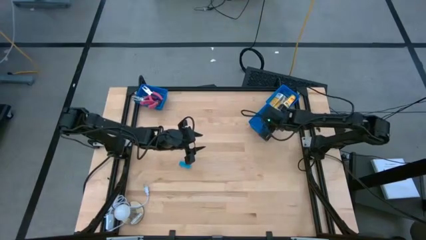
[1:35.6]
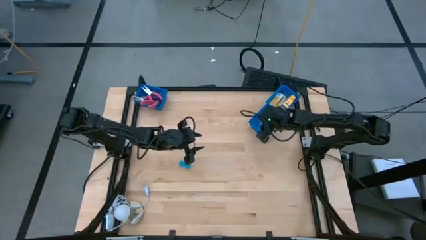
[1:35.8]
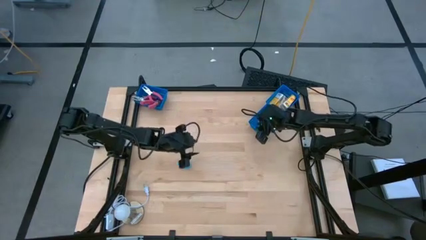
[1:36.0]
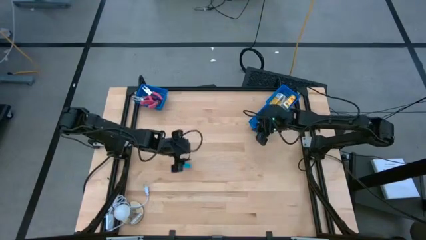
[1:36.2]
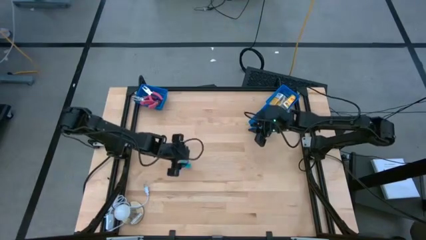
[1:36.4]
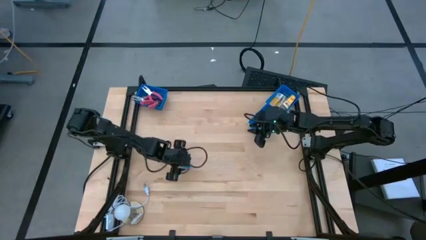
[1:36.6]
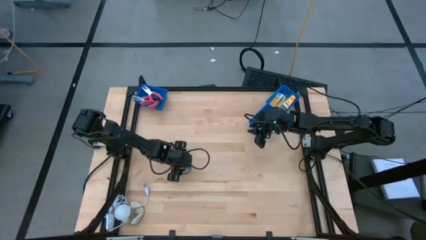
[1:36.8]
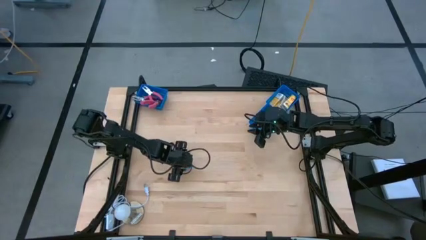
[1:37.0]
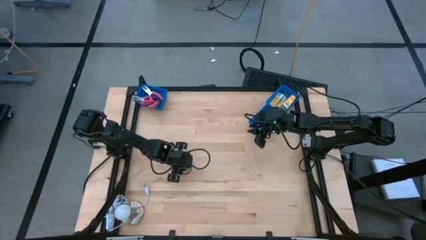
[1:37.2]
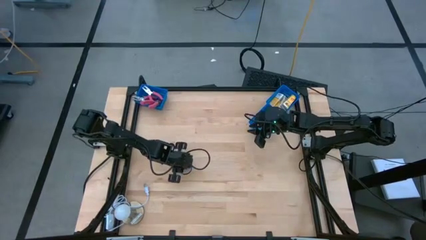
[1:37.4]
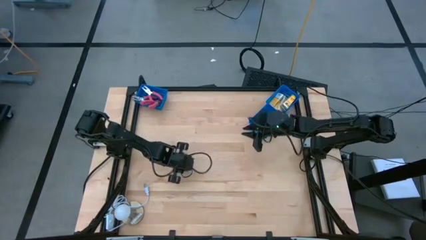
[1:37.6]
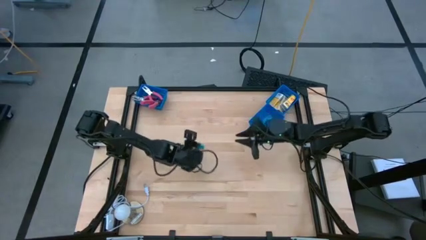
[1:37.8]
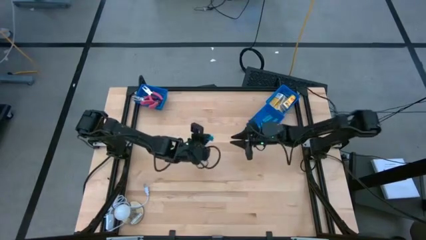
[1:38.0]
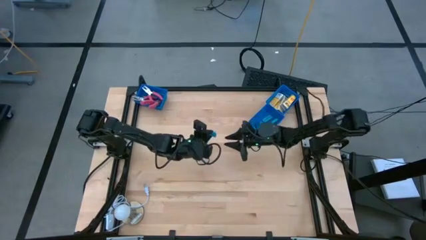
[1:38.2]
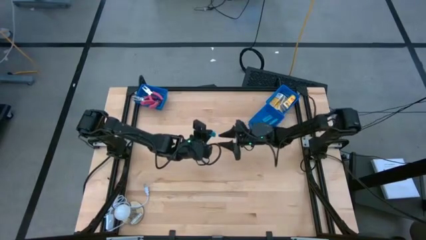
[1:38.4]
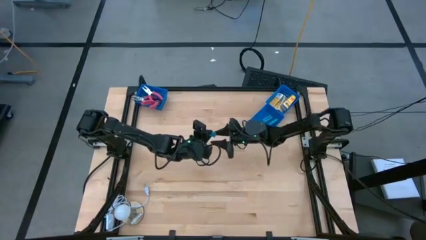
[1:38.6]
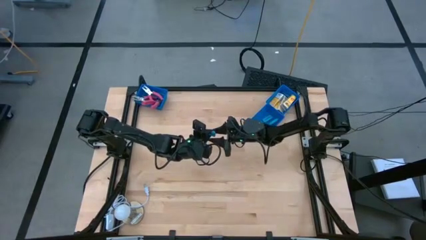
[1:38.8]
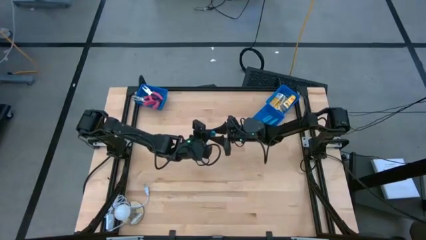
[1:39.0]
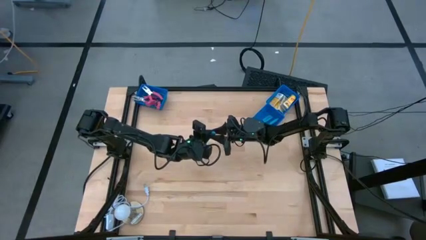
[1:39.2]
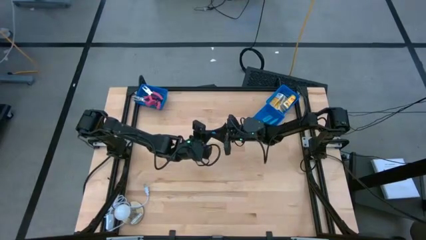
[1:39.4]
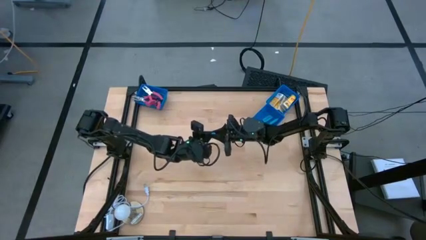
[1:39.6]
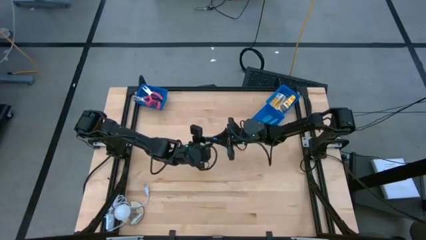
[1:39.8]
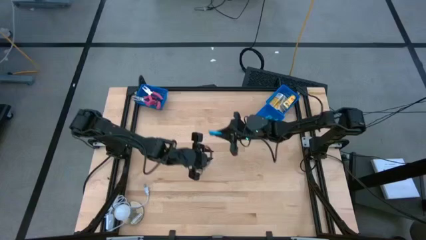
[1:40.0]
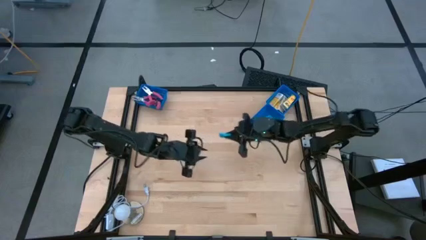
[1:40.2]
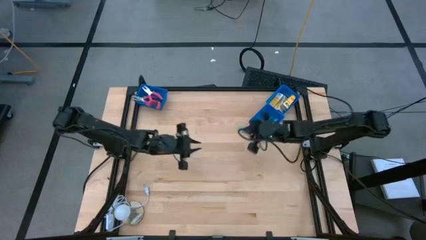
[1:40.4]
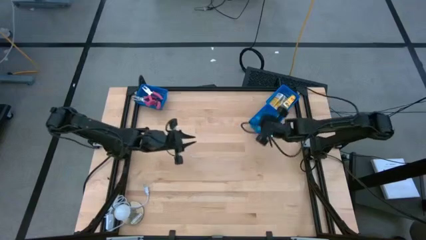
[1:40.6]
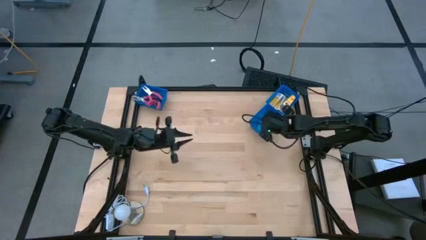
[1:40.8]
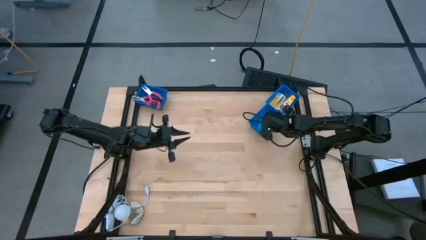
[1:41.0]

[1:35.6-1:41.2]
Task: Pick & Place School Supplies
Put the blue eraser into the bottom right blue basket

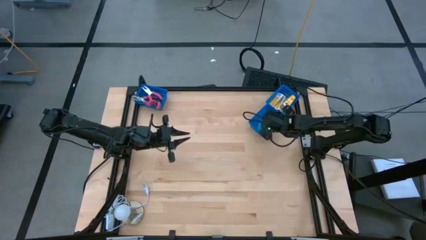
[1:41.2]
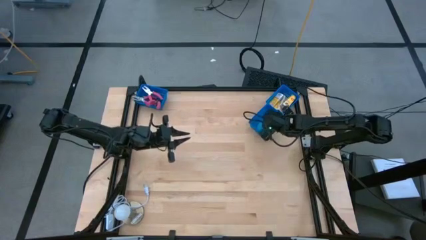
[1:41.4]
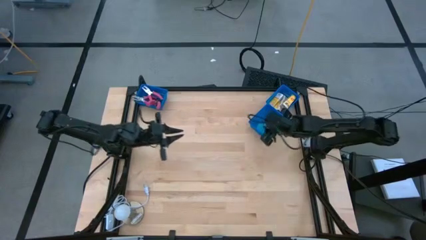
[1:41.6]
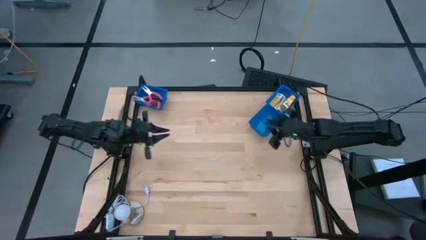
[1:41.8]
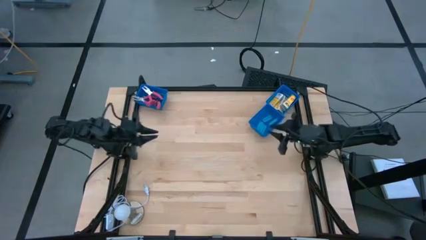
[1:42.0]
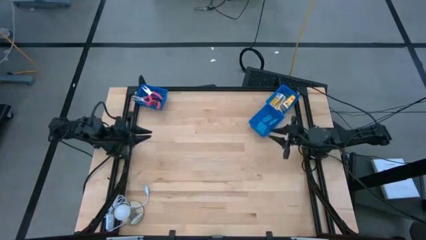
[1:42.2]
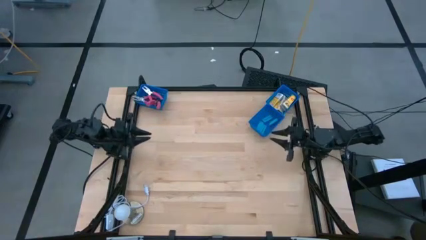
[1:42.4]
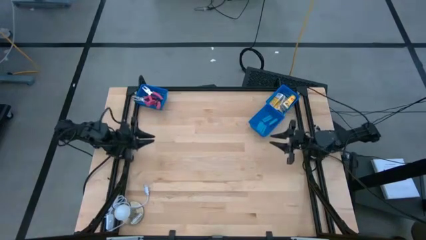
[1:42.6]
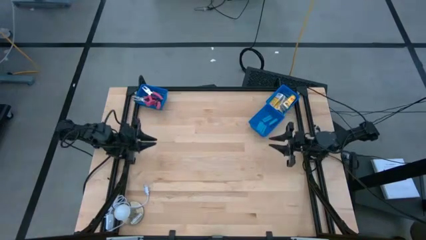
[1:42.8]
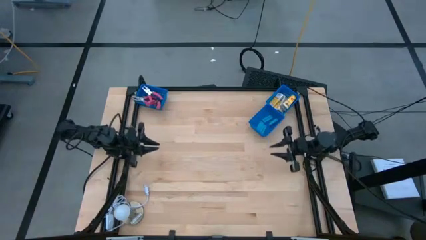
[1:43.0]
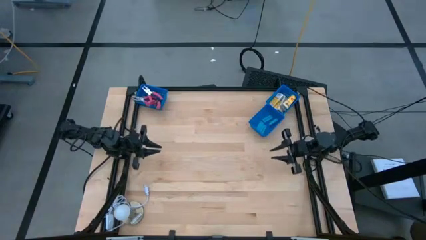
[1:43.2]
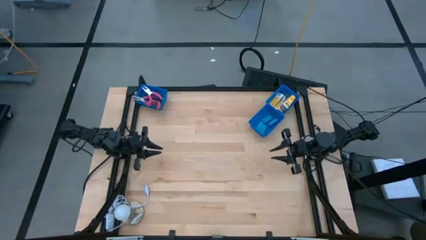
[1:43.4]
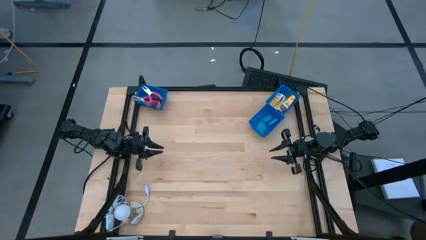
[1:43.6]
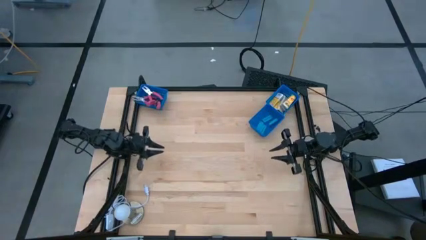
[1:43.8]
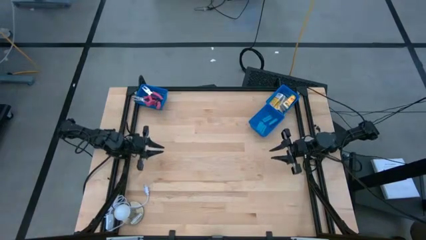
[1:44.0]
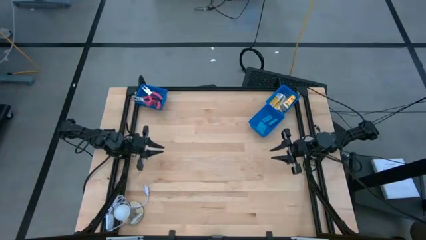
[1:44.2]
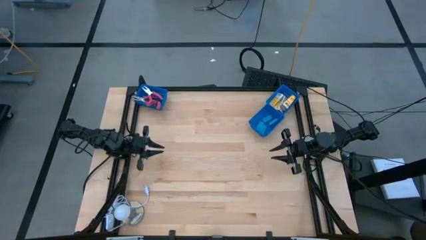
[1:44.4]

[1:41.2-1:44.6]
Return to Home Position

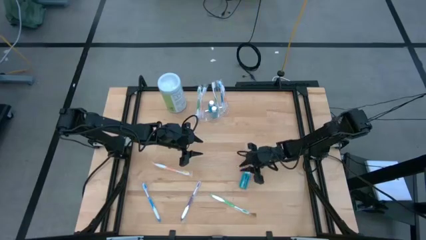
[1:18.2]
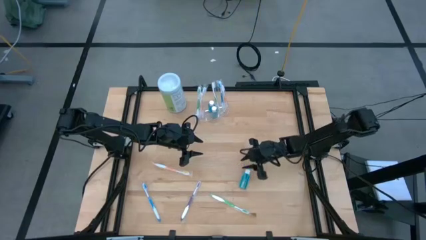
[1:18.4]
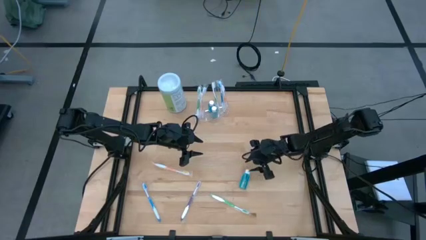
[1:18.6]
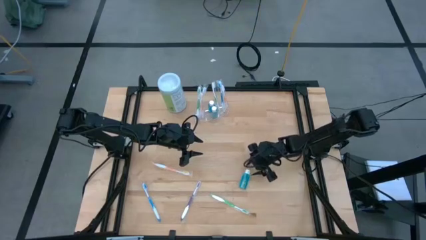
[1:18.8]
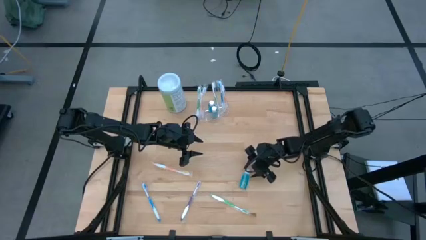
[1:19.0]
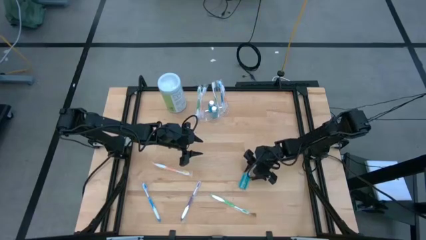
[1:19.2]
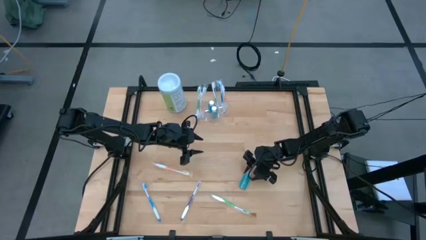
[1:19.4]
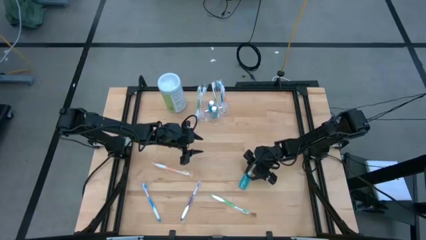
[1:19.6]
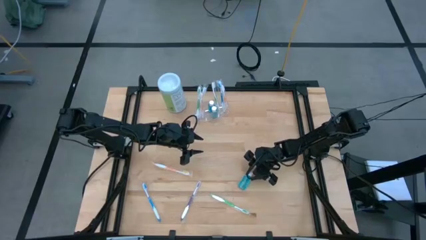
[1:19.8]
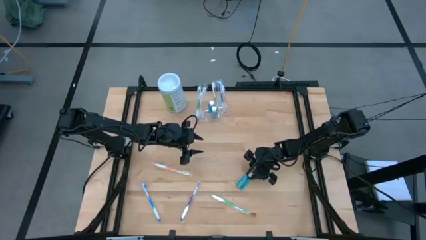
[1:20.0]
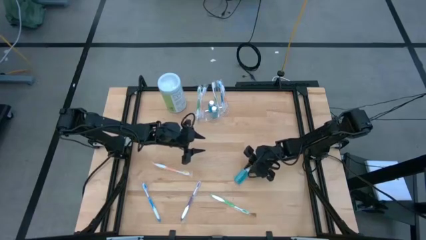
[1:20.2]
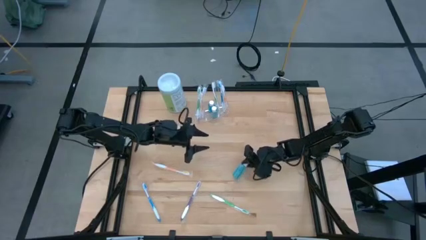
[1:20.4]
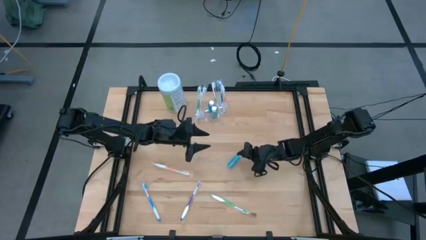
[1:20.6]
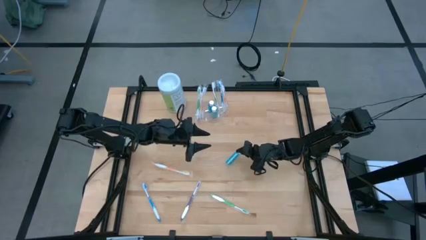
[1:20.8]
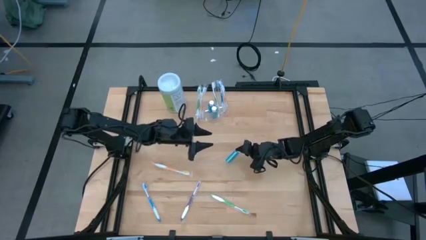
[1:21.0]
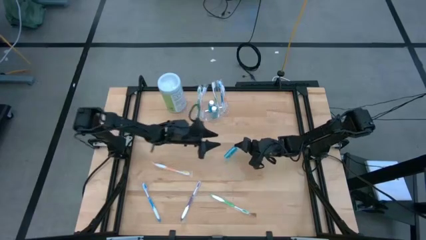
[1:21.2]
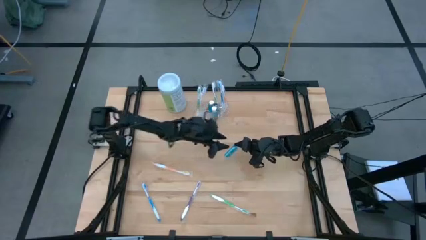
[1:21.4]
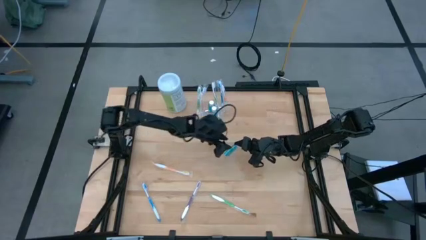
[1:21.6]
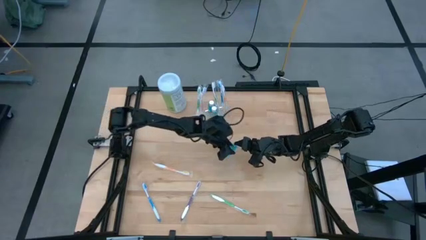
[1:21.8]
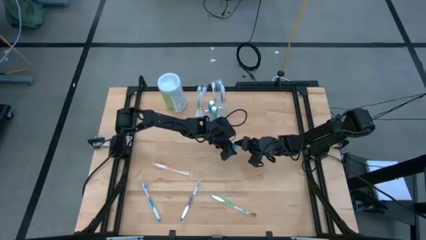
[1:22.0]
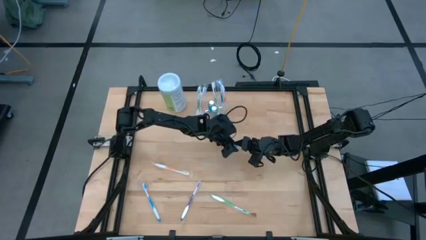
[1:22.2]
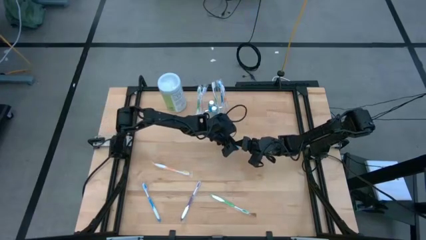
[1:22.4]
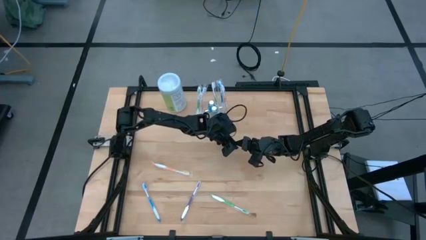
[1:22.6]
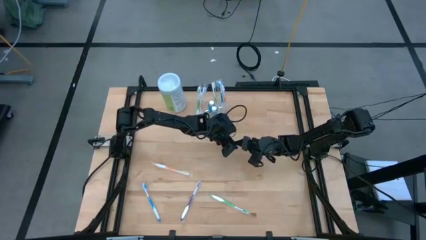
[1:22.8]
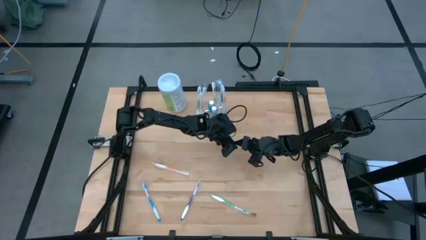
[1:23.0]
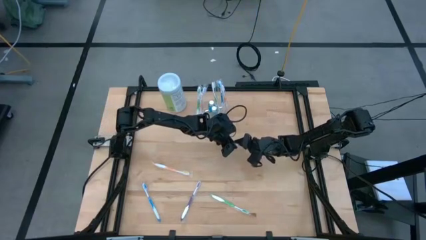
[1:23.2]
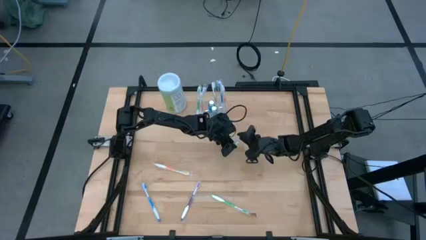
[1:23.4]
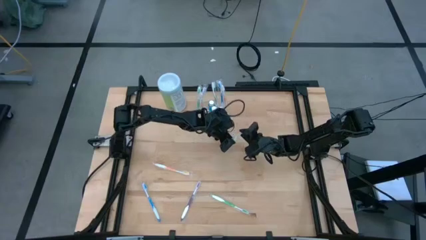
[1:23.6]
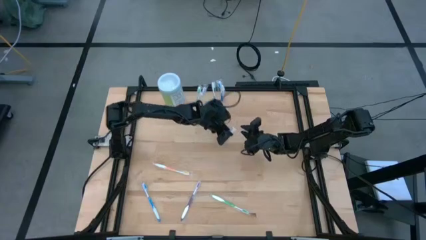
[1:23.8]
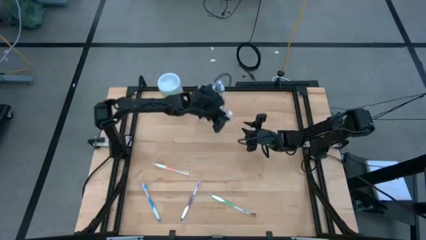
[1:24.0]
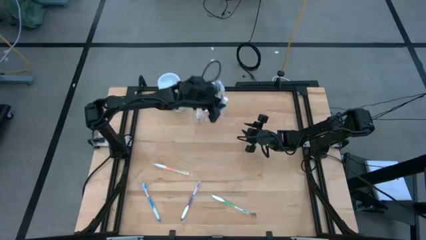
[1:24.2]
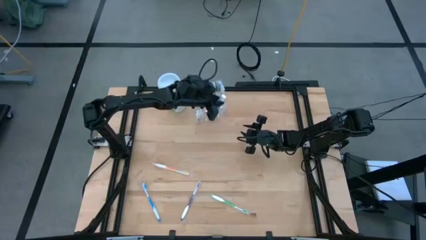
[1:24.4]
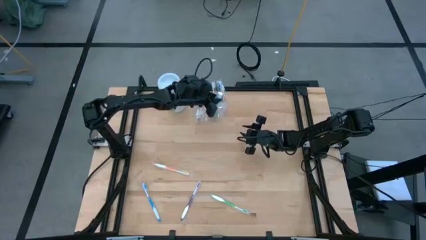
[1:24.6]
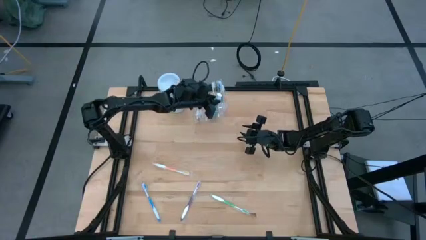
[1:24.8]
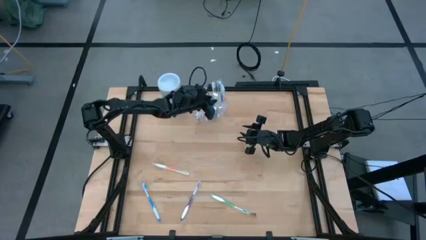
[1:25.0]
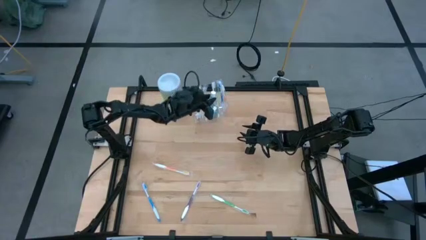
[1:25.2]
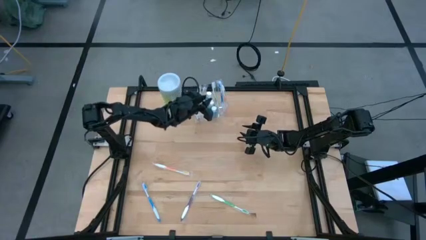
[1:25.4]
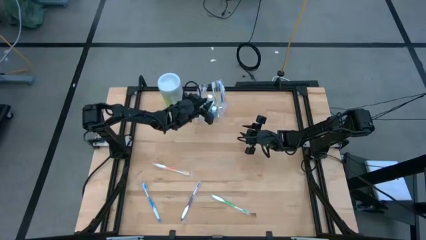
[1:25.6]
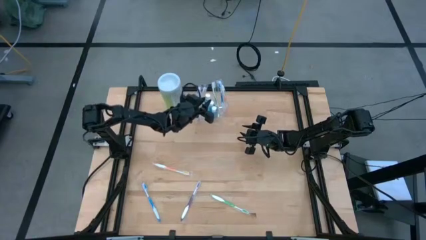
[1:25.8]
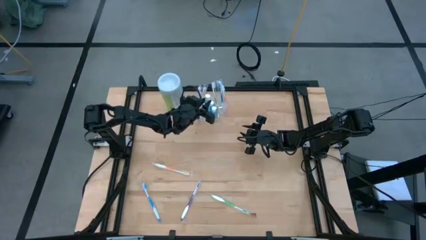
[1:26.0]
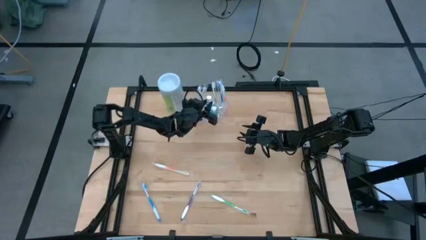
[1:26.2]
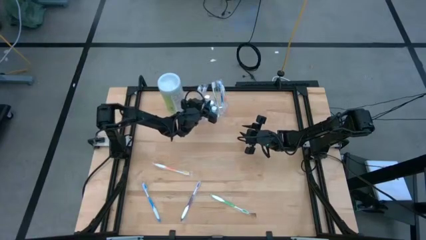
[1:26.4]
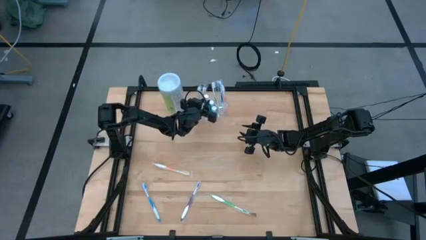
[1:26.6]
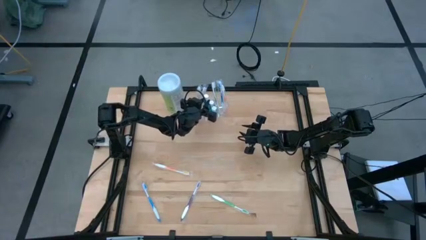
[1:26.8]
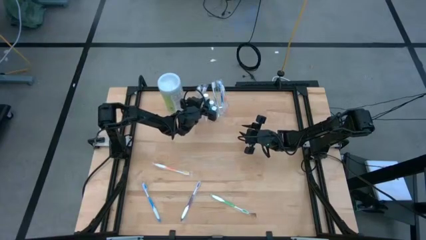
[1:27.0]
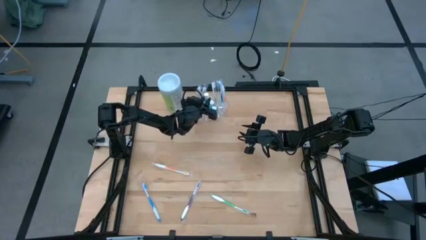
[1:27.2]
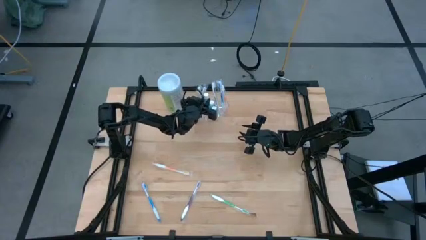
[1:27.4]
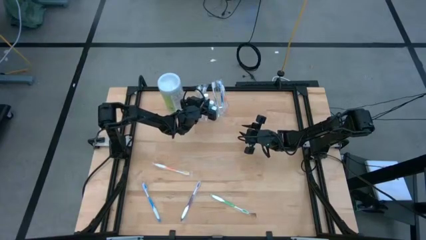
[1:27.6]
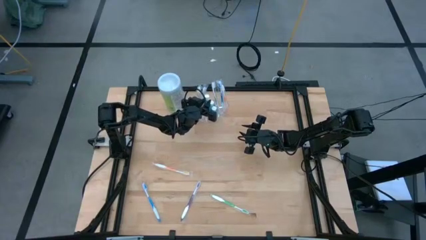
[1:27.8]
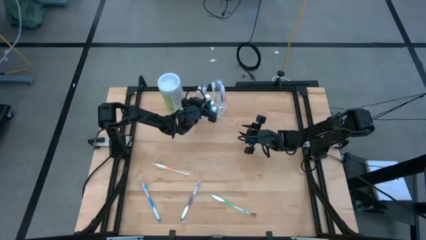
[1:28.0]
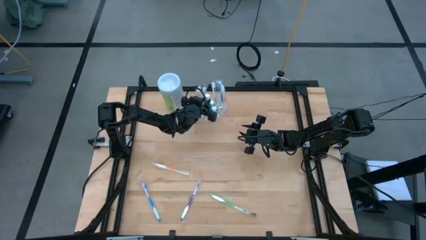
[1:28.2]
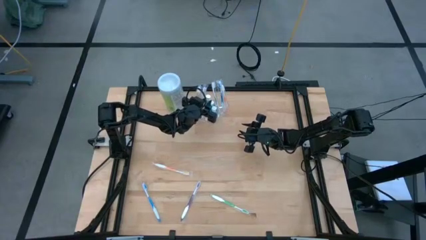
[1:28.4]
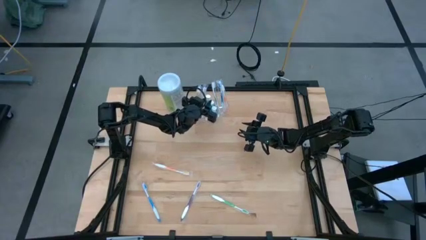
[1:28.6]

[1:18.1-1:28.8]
Task: Pick & Place toothbrushing station
Put the blue mouthwash into the transparent organizer
